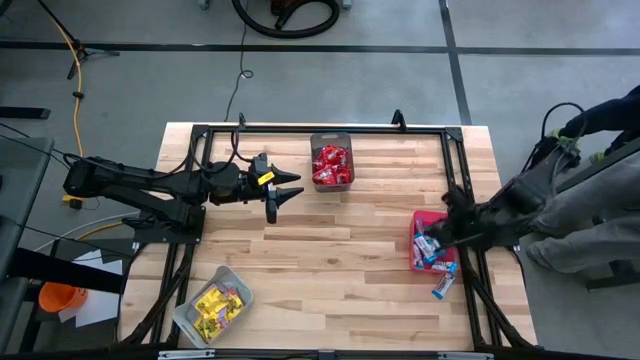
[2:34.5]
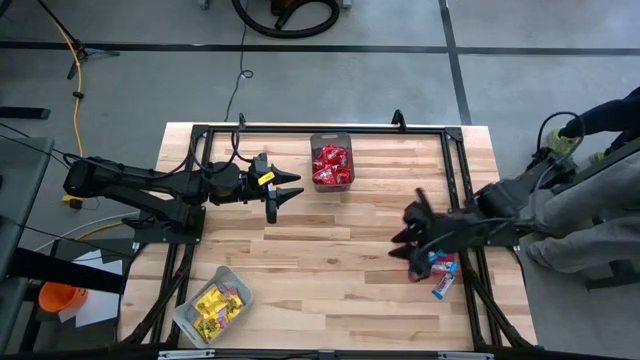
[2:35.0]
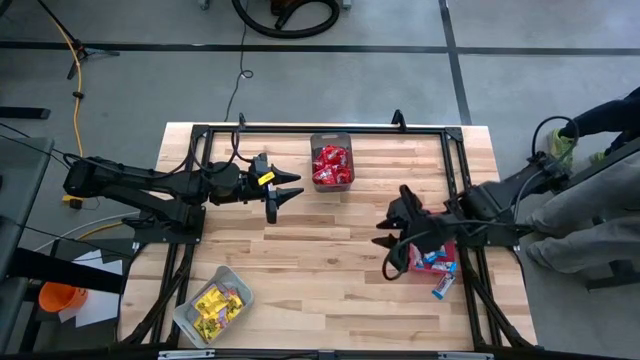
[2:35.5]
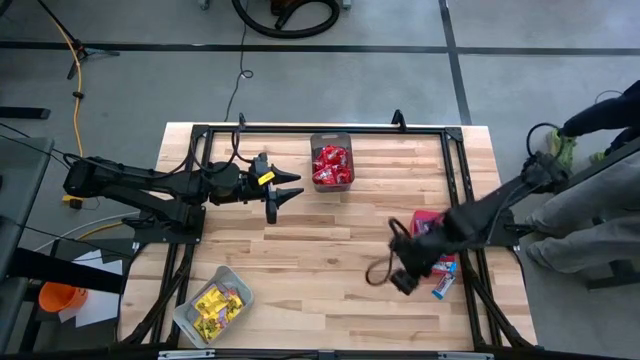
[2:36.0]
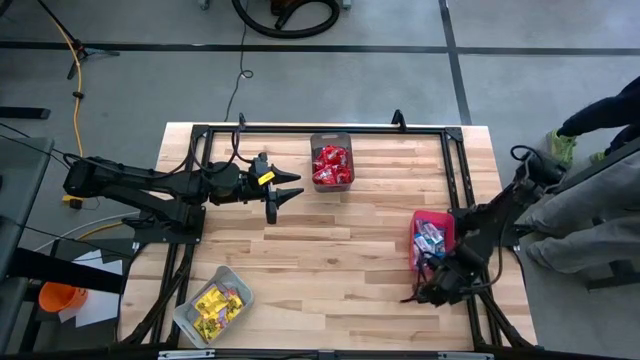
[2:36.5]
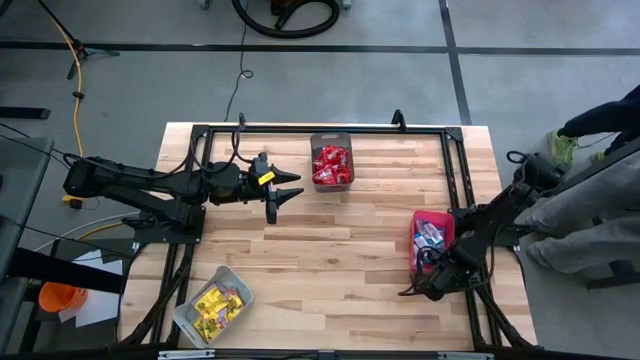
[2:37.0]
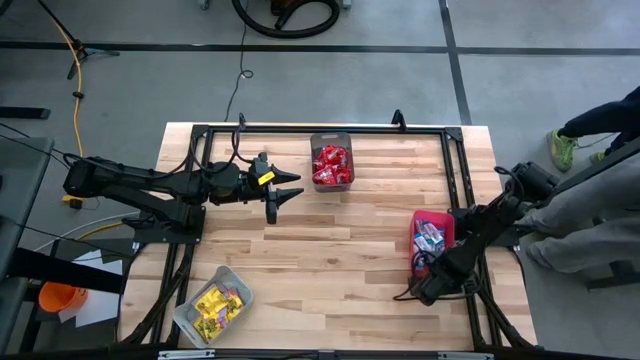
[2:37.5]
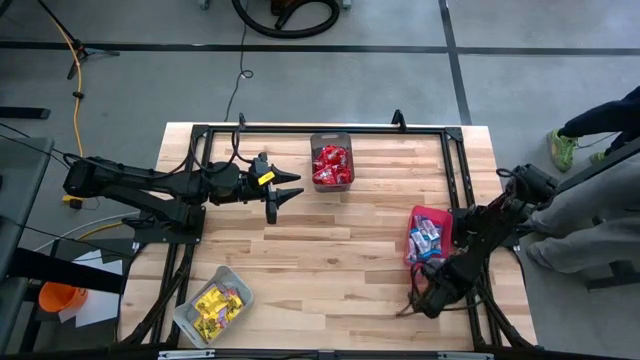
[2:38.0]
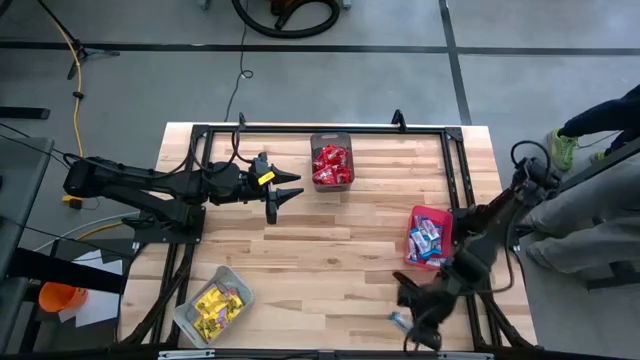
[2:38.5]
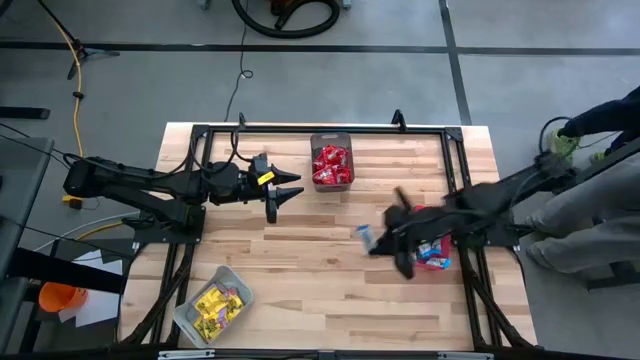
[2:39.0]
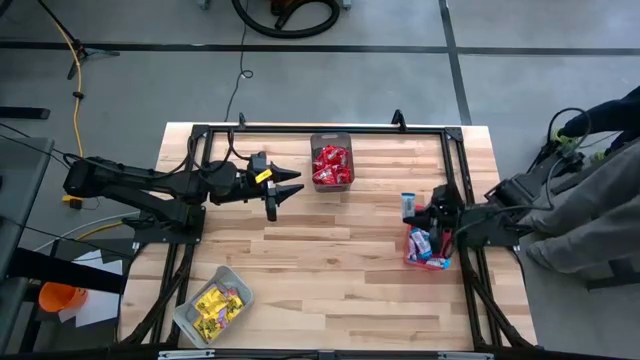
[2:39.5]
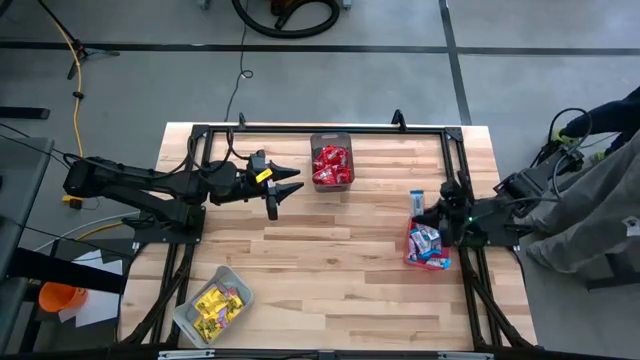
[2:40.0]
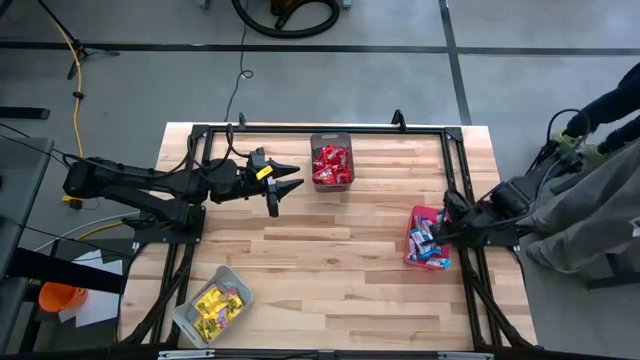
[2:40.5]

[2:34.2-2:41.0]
Task: Sort candy
Put the white chocolate candy into the red bin

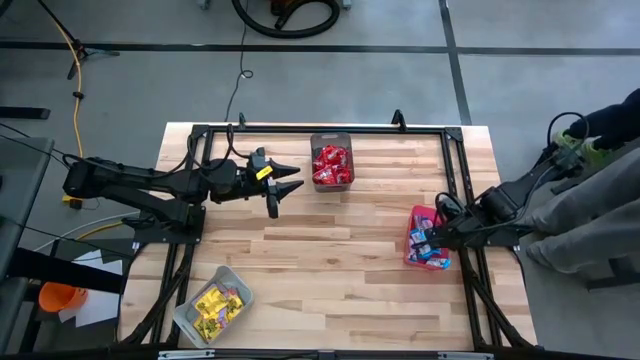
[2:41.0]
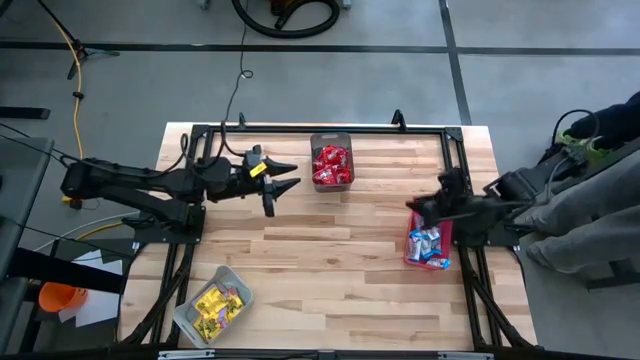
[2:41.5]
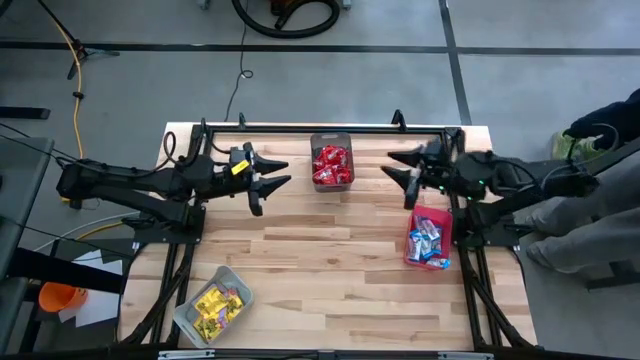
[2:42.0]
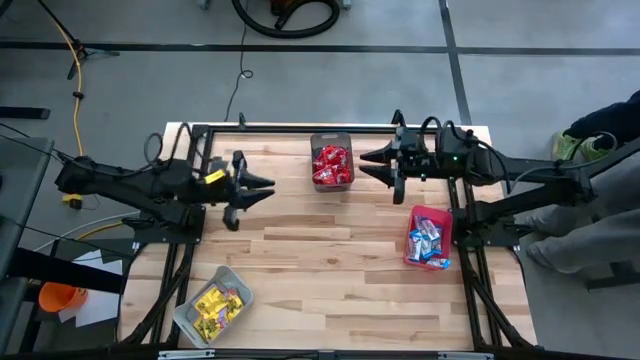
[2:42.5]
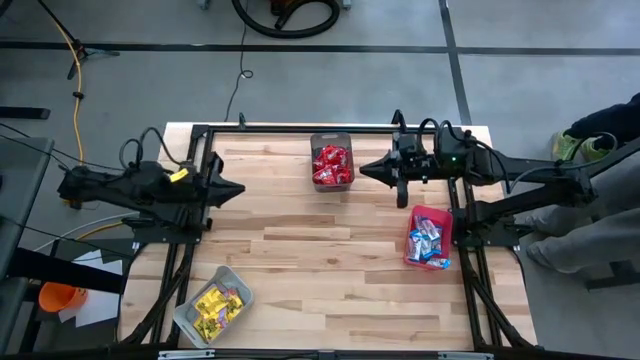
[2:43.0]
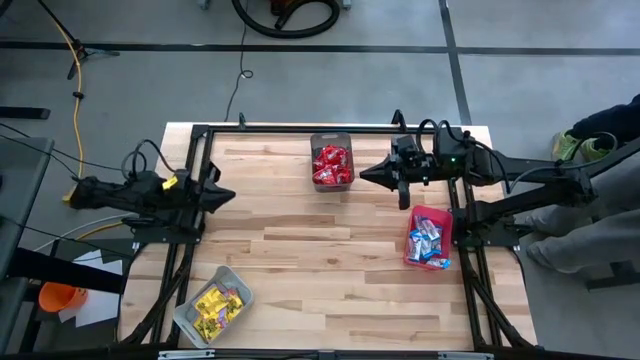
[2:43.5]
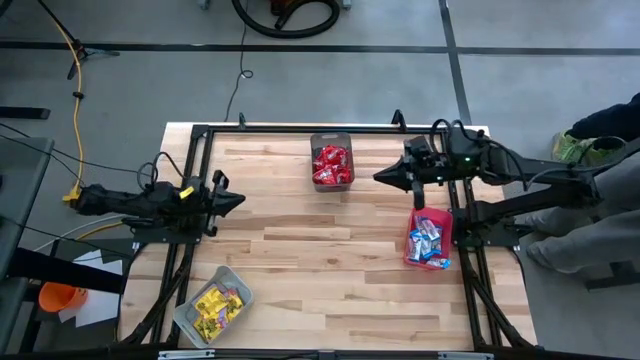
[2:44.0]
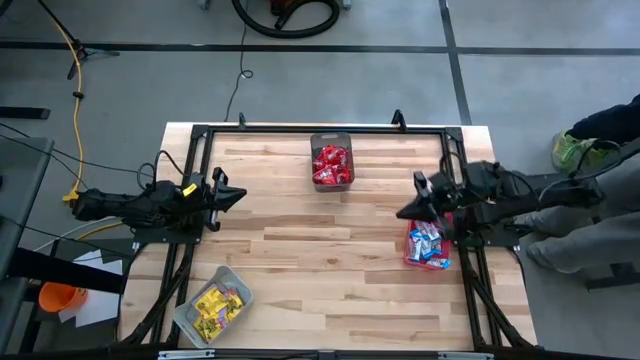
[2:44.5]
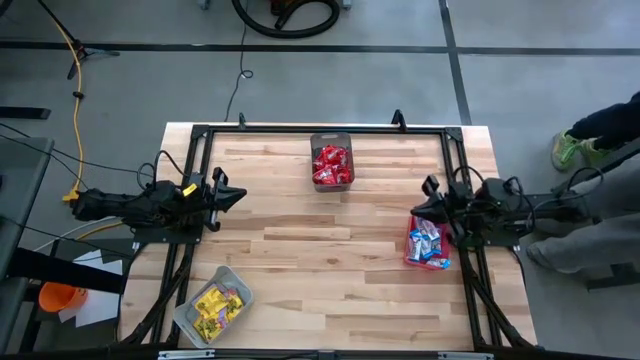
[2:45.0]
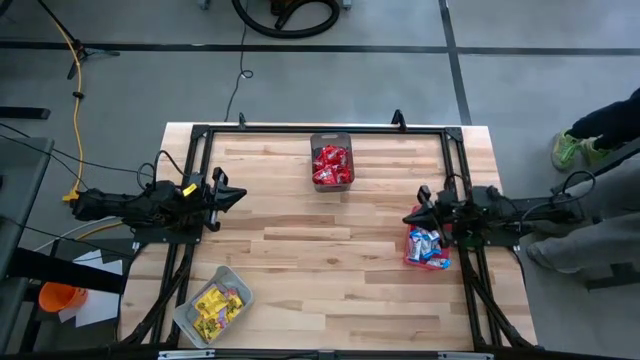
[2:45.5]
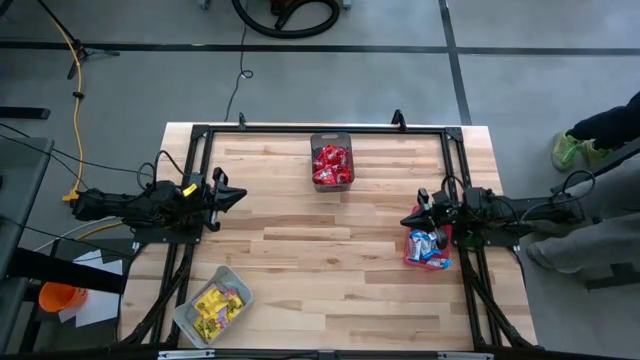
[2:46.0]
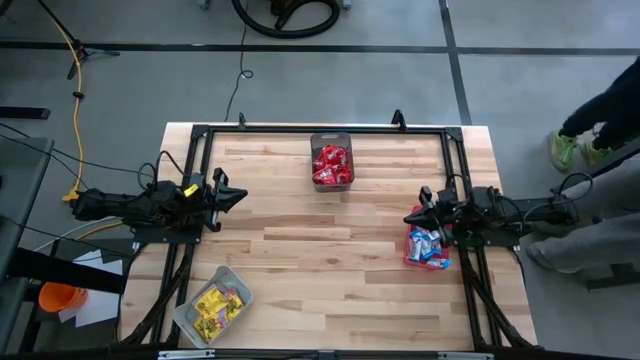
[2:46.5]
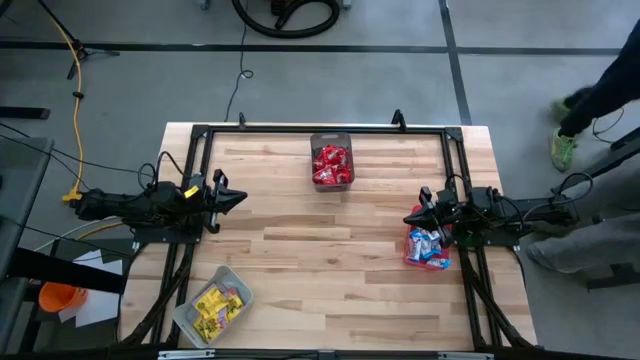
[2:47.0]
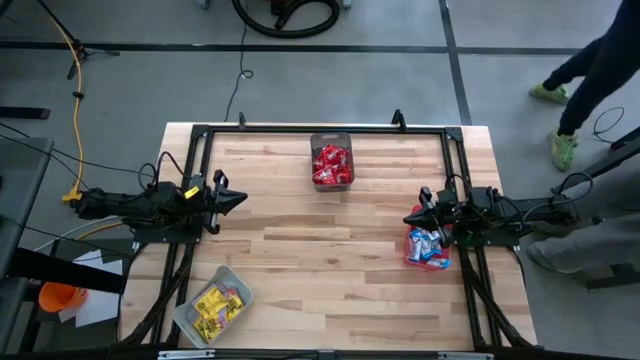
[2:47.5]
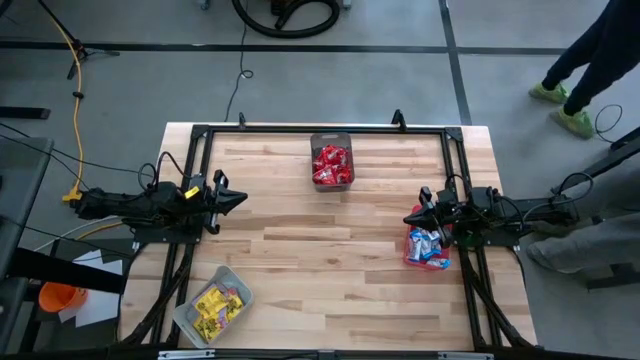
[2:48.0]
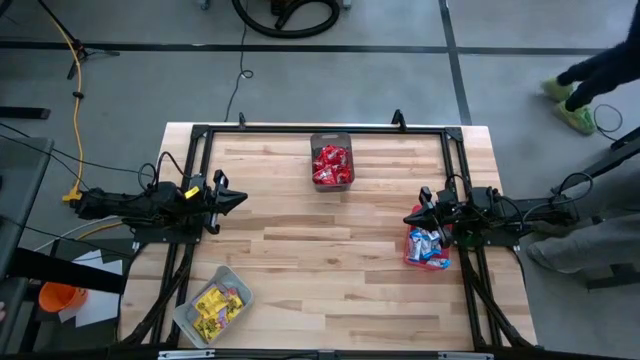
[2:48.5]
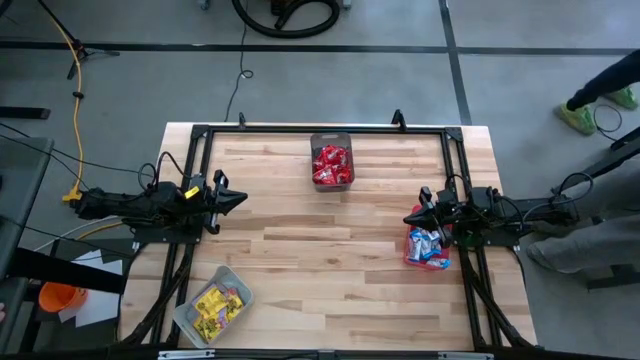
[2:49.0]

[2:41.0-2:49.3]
Return to Home Position

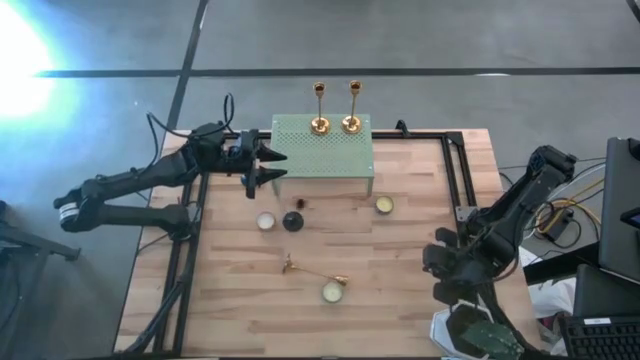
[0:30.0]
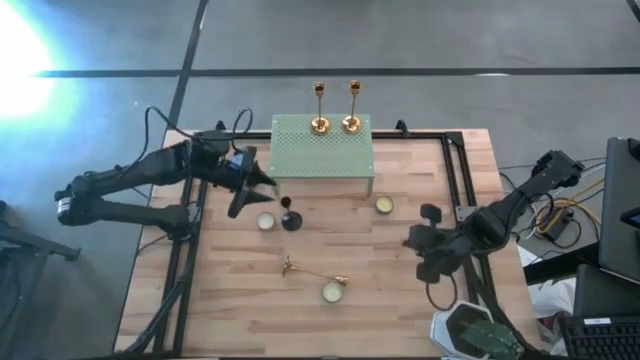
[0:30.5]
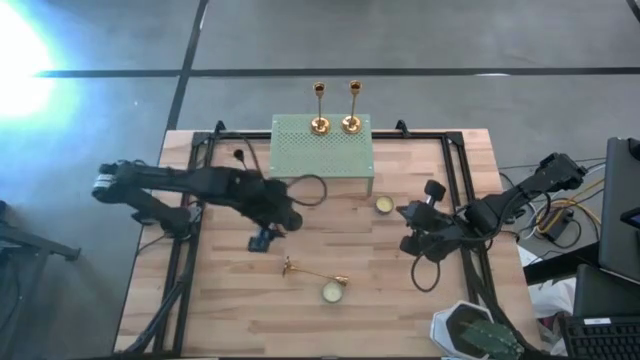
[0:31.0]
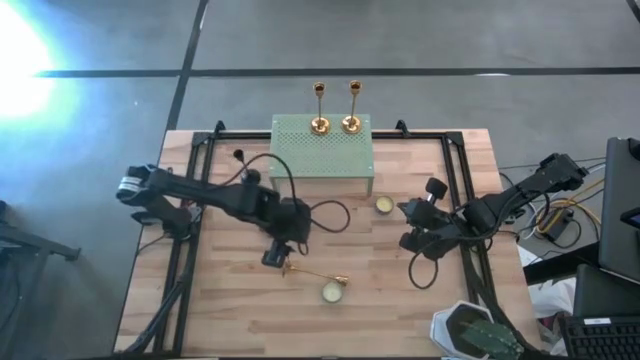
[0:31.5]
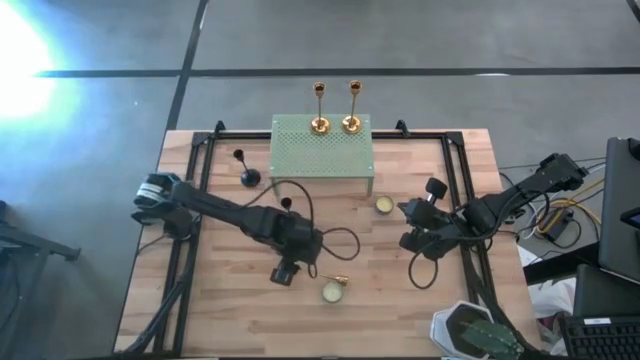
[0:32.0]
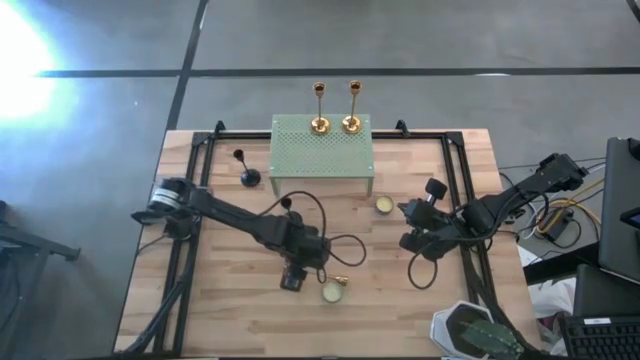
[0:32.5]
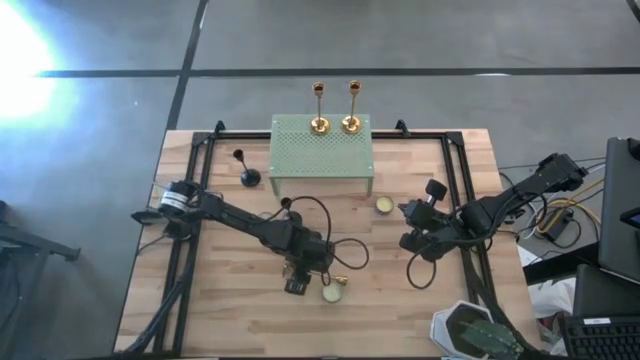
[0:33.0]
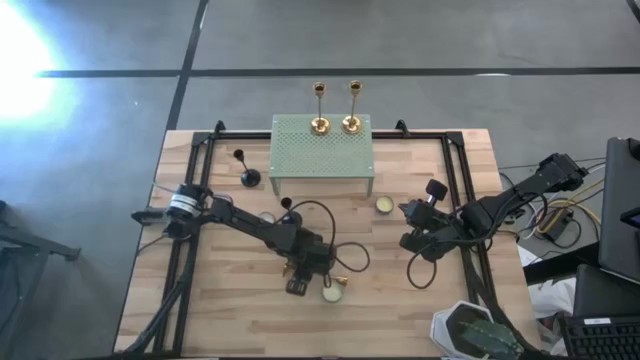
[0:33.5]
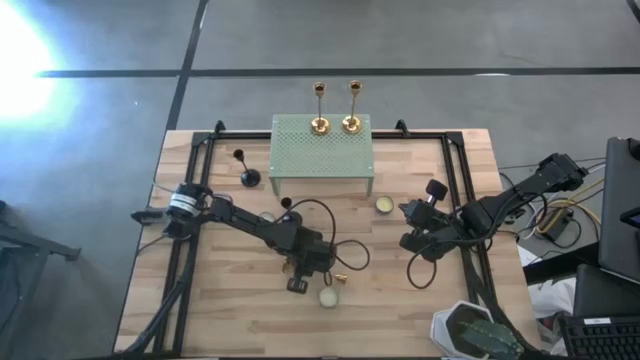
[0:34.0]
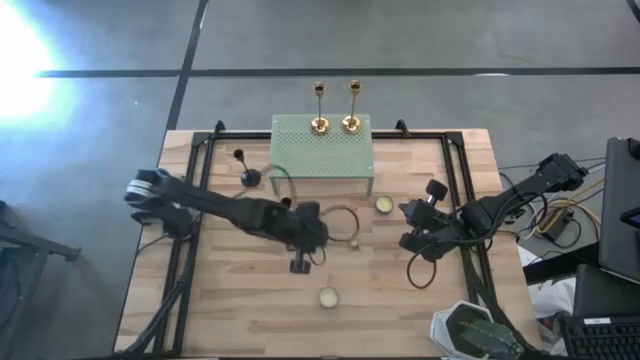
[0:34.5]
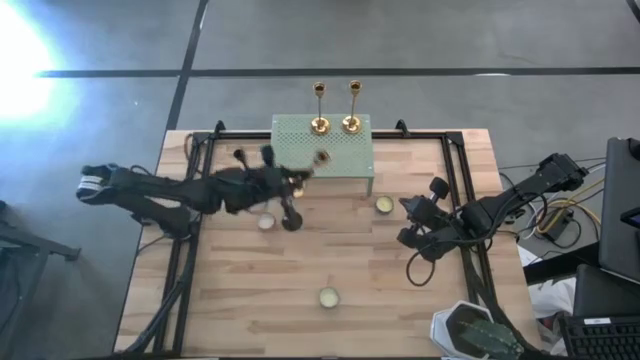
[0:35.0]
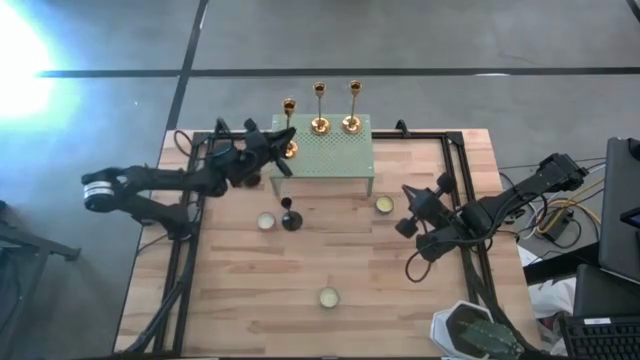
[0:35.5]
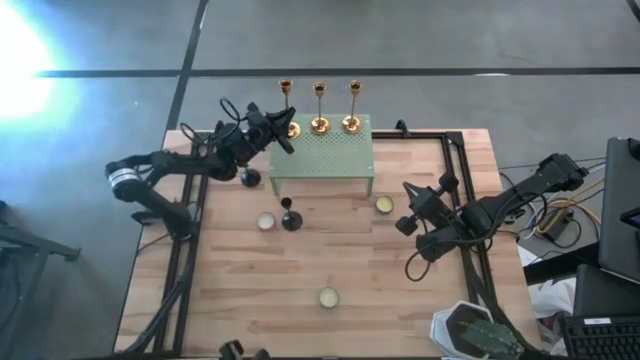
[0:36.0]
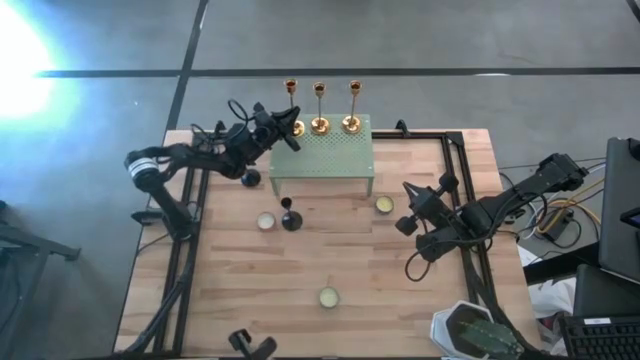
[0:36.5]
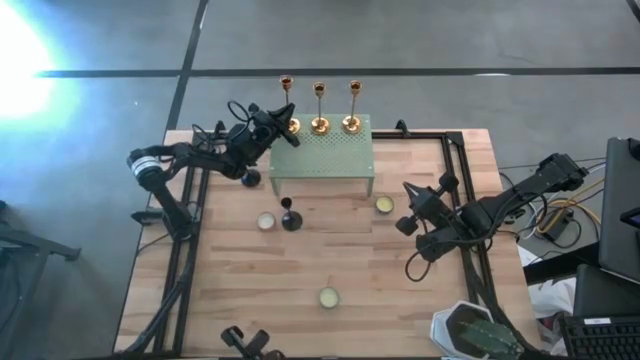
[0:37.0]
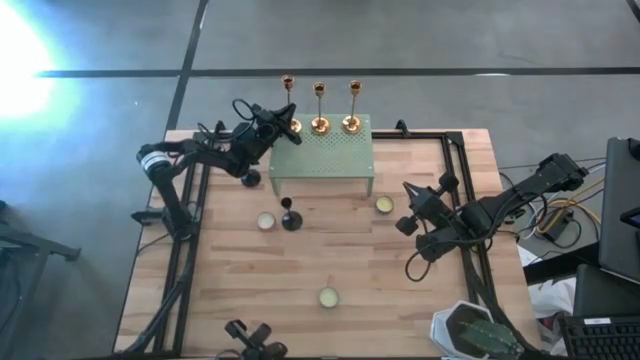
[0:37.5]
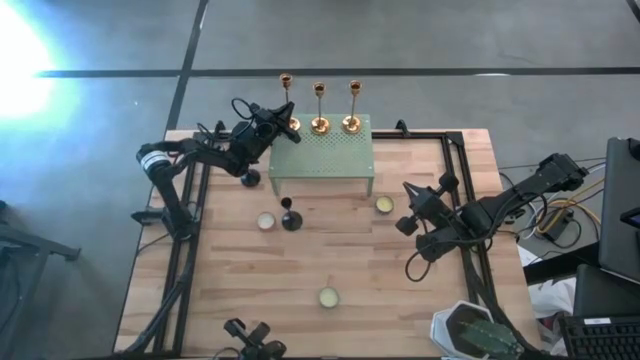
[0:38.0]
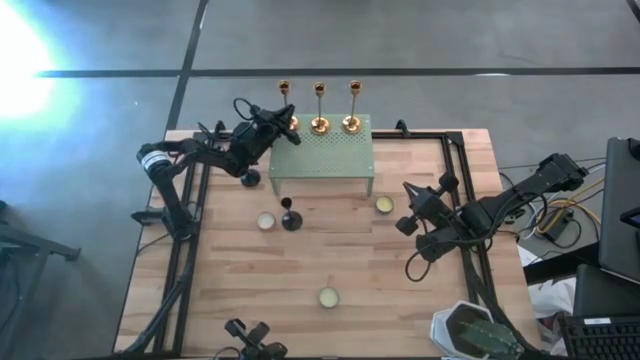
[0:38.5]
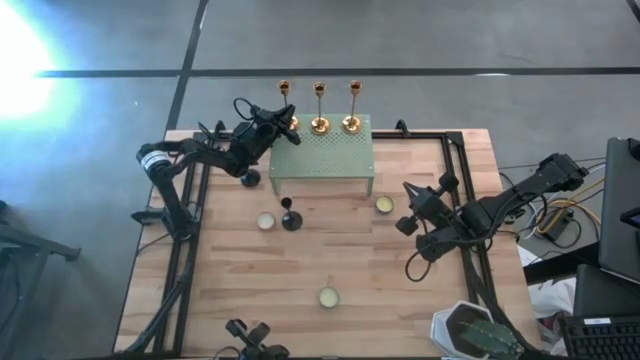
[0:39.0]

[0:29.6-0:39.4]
Task: Pick & Place candle stick holders
Align the gold candle holder with the other gold candle holders on the shelf
